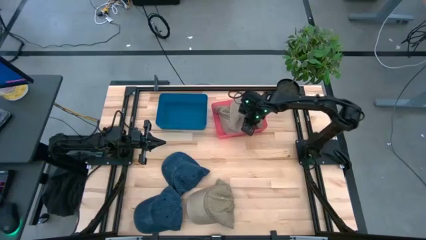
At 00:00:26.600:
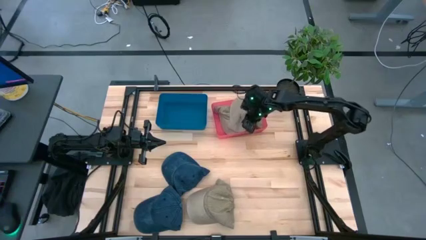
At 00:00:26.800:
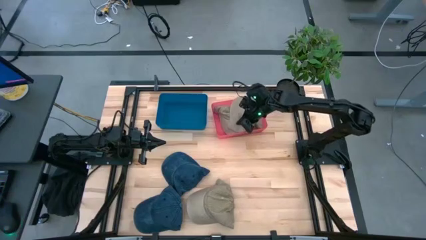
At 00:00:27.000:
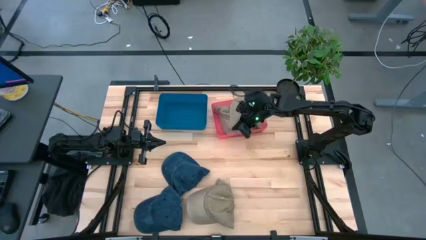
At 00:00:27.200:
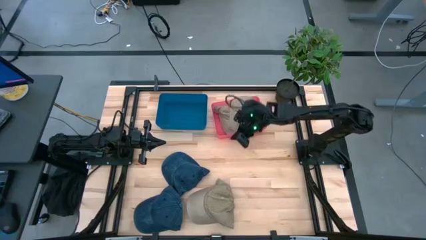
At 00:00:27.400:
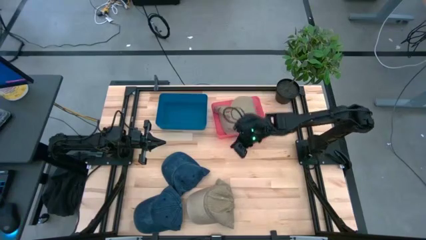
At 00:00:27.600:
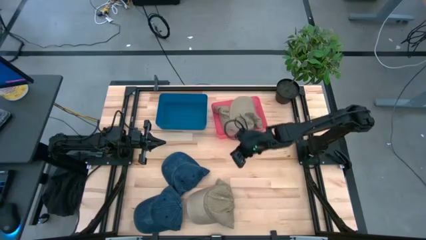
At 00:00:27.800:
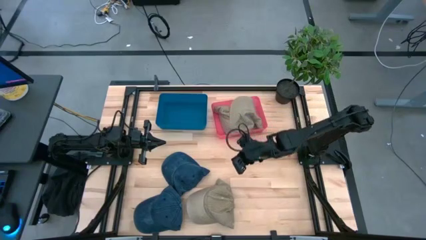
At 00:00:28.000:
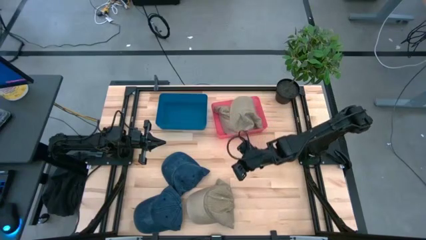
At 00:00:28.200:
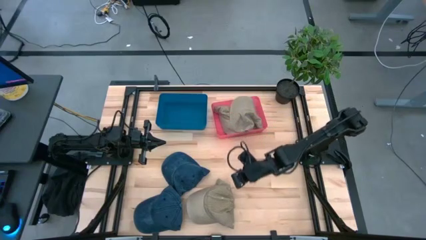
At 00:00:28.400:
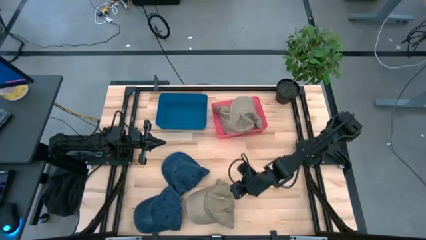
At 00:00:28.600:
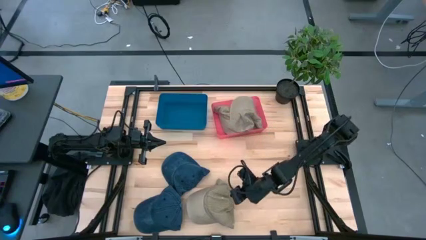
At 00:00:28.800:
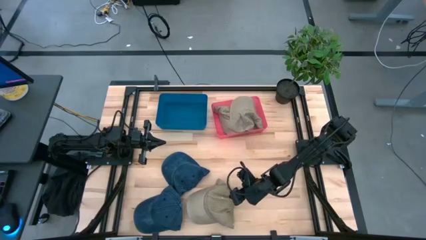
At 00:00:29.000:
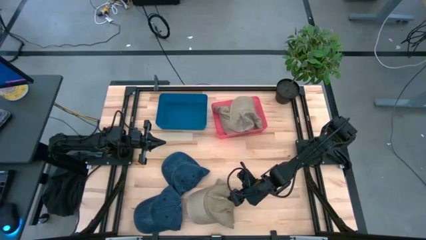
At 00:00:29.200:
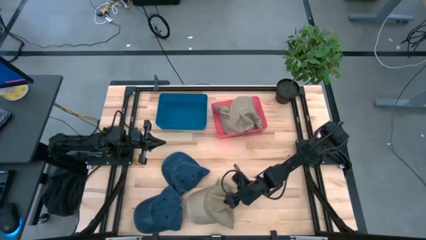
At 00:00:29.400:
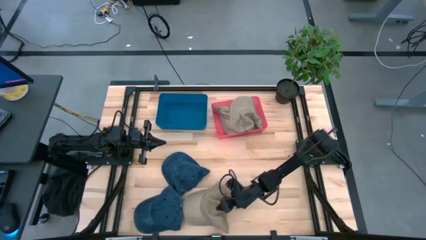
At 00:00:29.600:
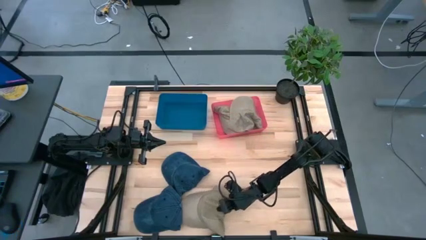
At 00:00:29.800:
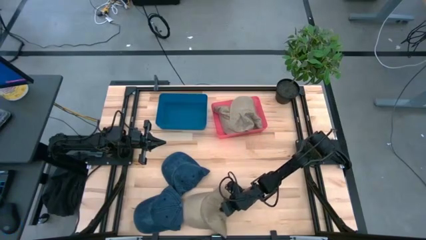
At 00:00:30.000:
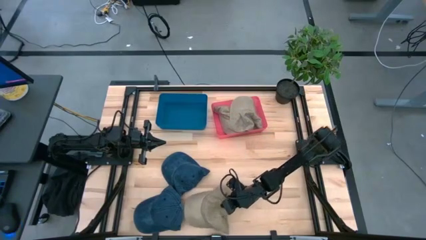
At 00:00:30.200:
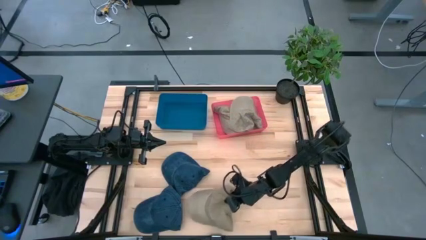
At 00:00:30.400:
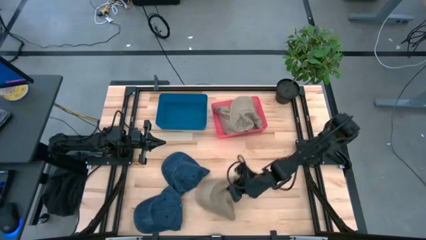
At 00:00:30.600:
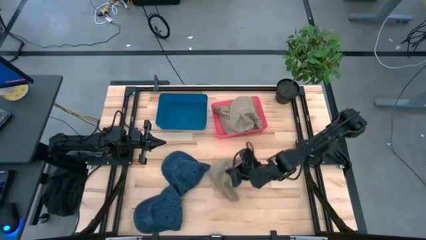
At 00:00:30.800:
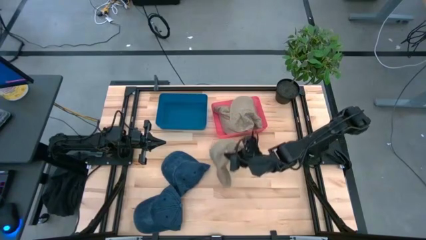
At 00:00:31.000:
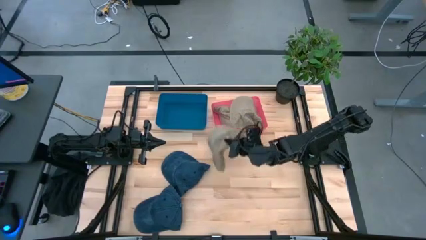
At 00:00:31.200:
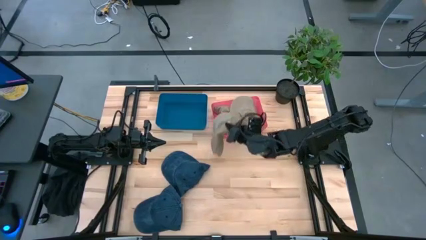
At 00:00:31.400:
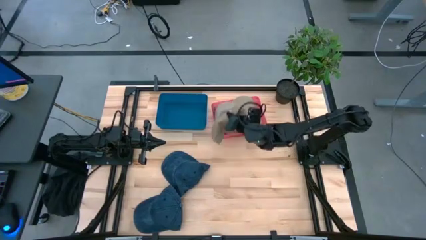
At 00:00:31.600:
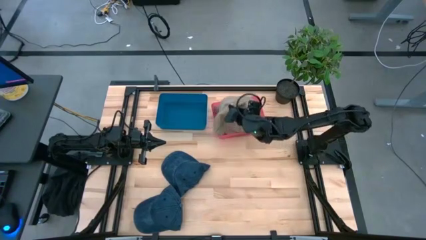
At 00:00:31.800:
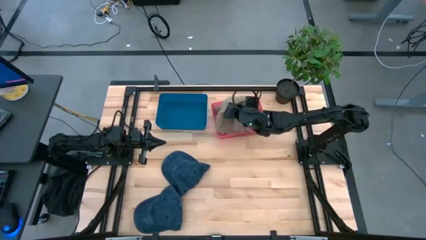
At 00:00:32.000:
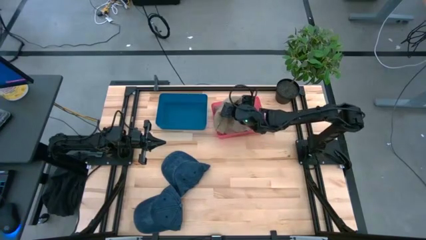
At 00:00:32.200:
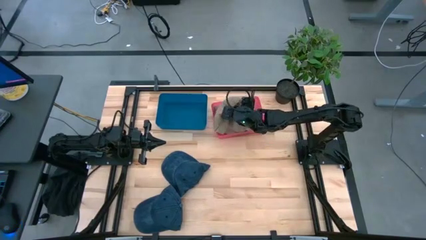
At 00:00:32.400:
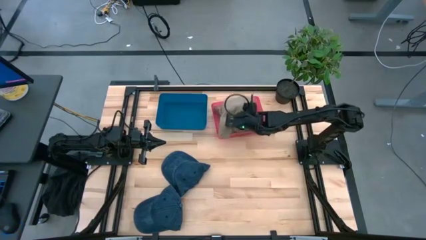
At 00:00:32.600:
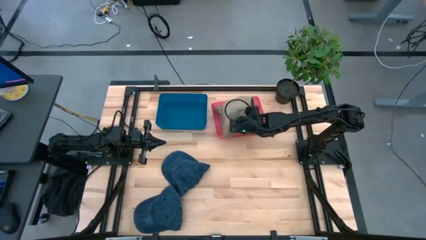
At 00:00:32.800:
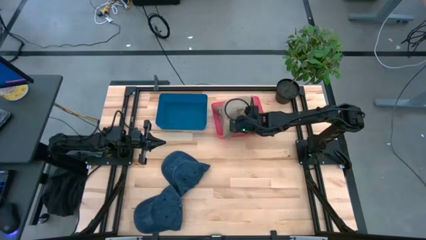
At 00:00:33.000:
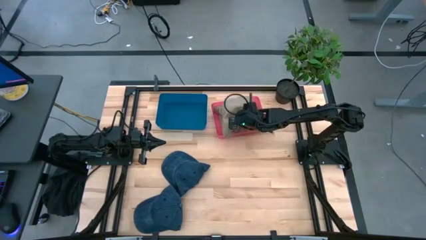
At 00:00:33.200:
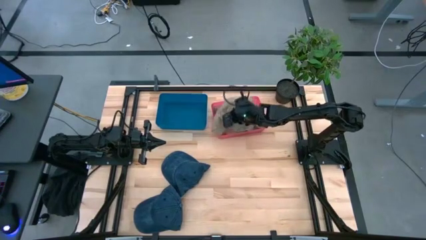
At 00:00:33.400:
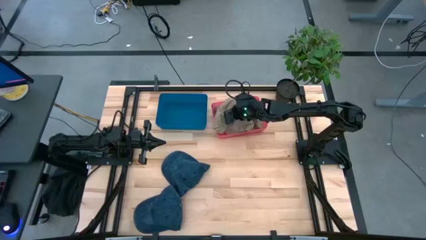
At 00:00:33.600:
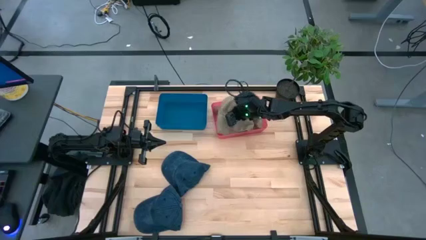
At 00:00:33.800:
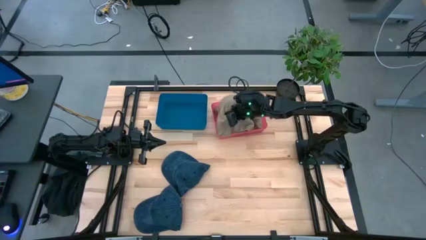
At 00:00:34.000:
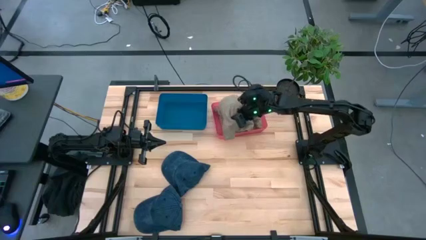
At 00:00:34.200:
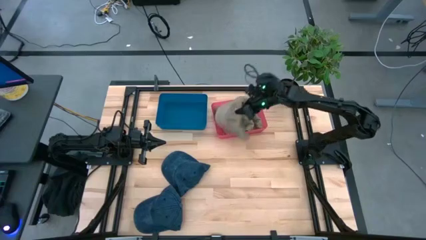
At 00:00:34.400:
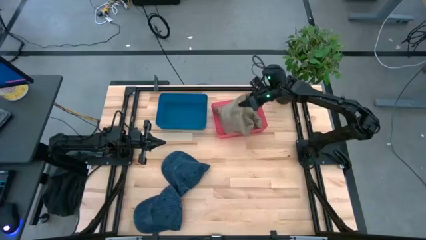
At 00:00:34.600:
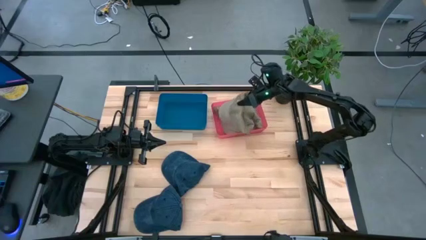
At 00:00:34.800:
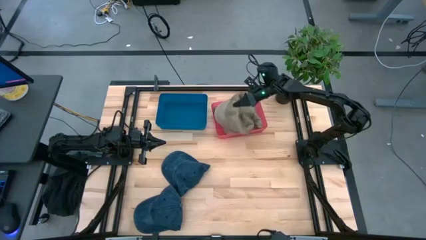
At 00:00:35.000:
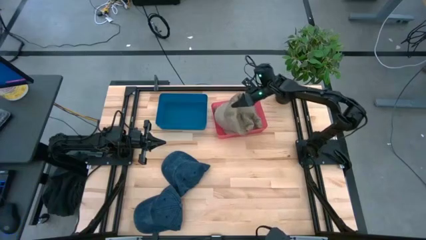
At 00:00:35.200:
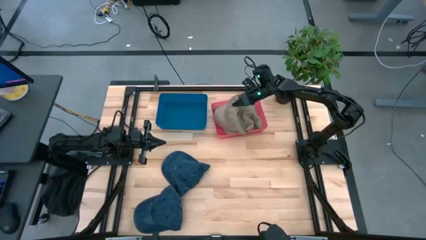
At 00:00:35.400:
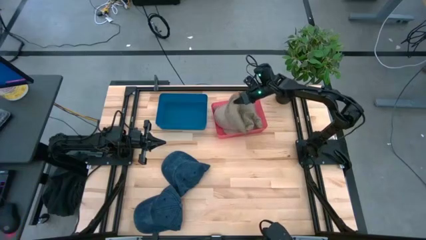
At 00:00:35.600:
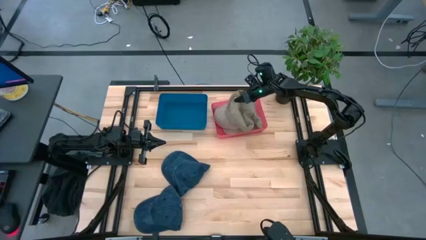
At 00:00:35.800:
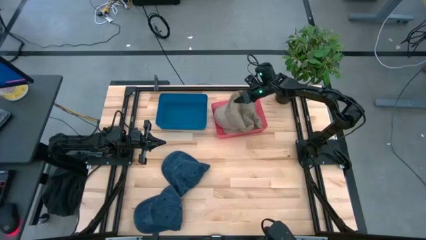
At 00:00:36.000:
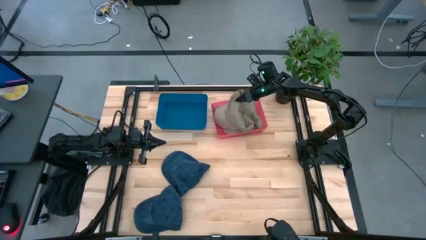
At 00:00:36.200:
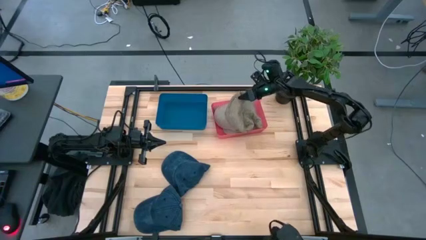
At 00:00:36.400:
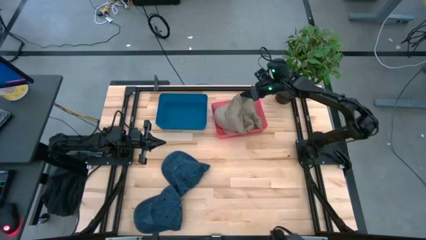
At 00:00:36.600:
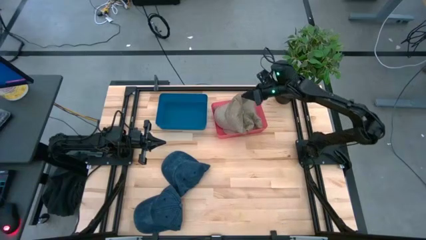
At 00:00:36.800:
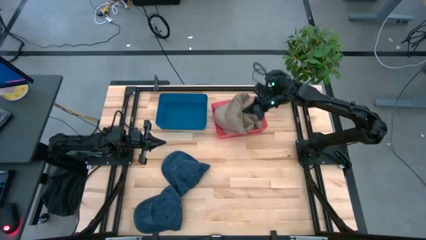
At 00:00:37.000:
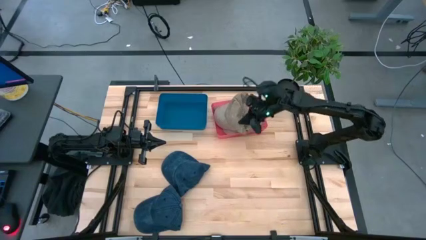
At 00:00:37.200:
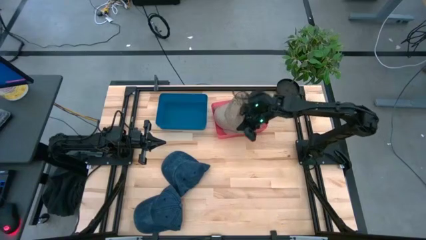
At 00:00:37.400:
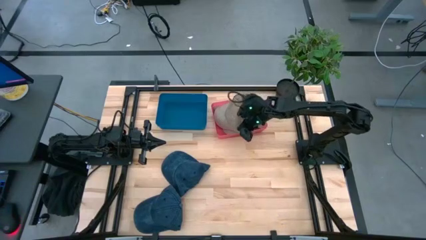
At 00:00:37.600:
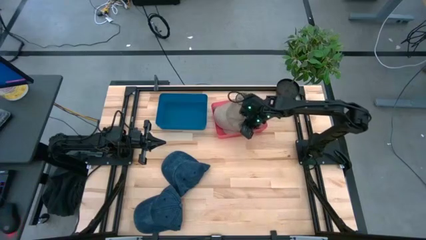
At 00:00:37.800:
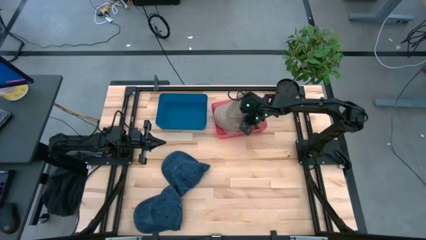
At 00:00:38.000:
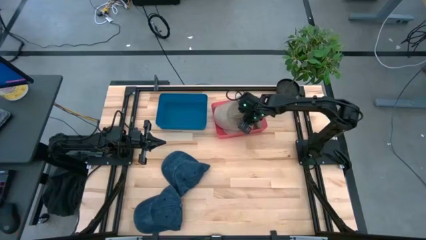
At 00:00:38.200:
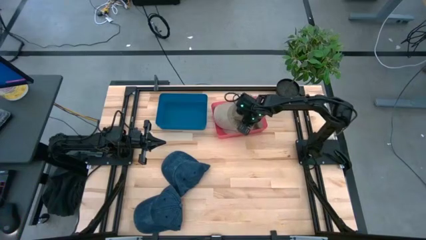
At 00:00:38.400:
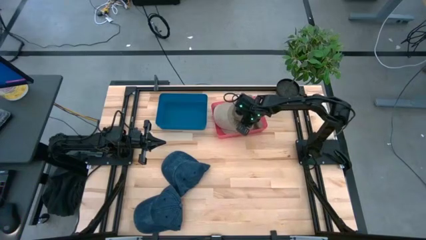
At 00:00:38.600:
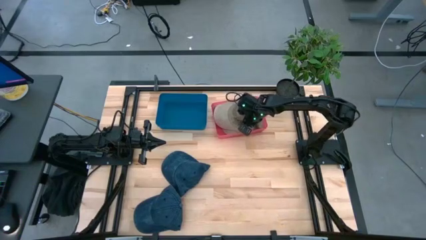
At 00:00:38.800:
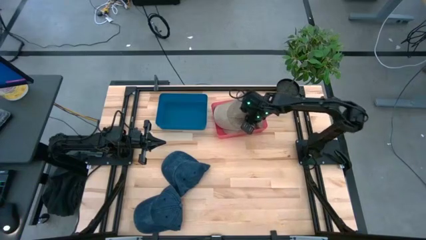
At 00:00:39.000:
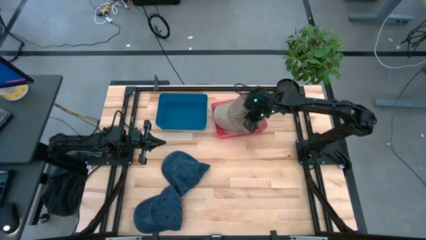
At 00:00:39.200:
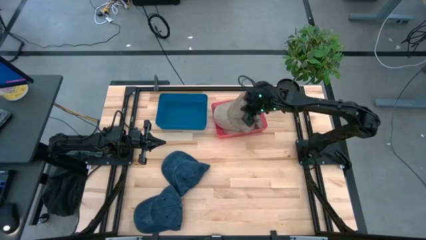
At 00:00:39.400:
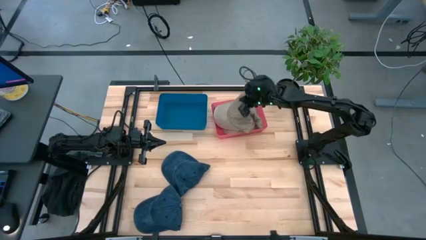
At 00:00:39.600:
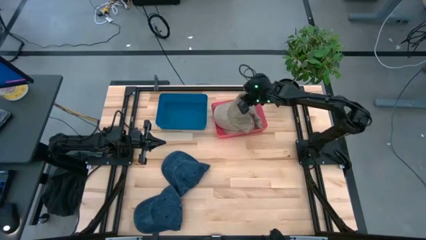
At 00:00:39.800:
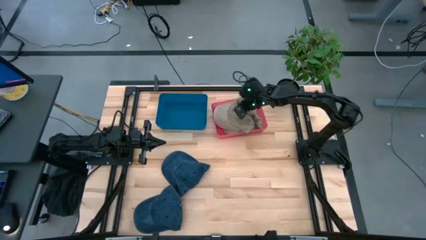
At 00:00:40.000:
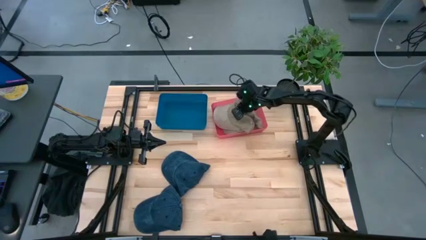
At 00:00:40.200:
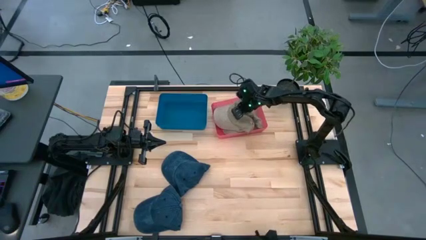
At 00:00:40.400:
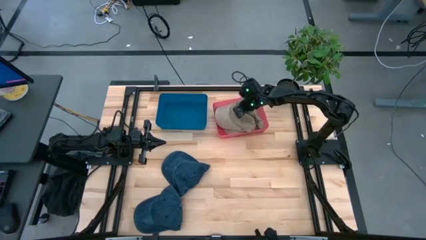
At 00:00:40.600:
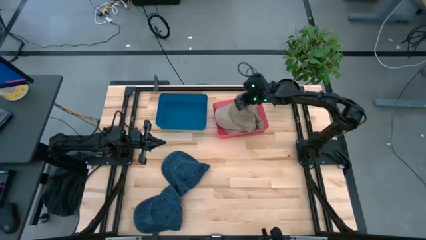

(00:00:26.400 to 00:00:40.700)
Task: Pick & Place hat
Put the brown cap into the pink bin
